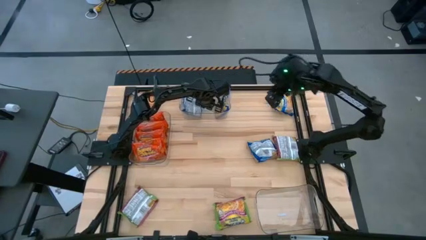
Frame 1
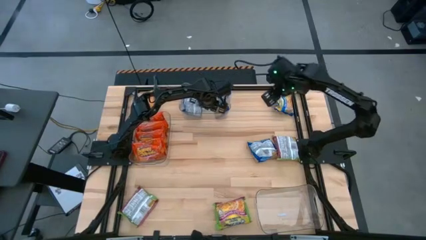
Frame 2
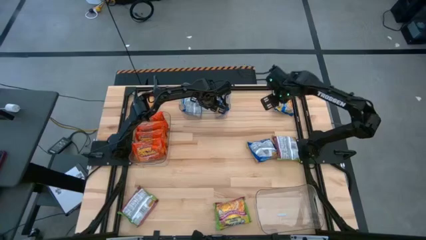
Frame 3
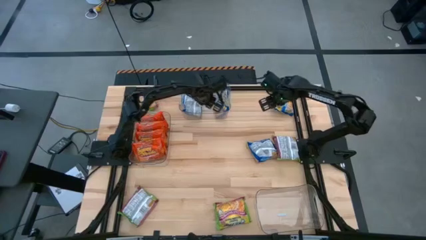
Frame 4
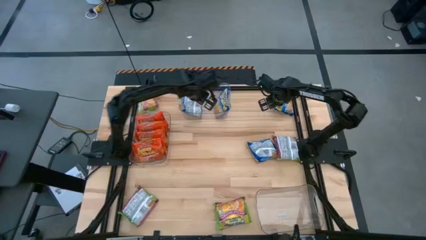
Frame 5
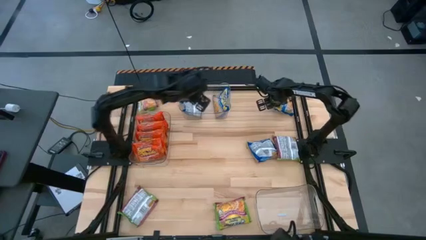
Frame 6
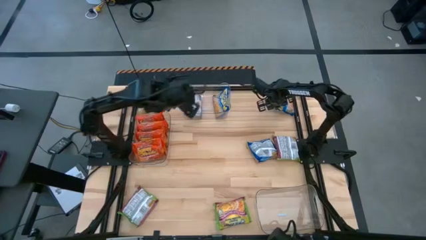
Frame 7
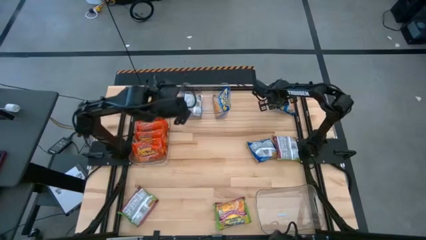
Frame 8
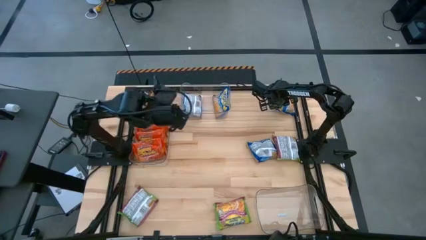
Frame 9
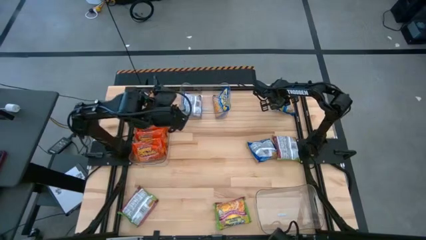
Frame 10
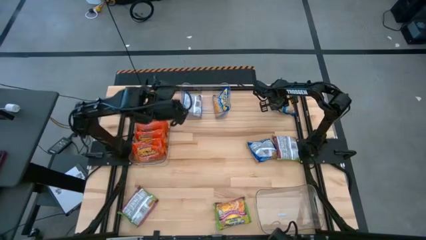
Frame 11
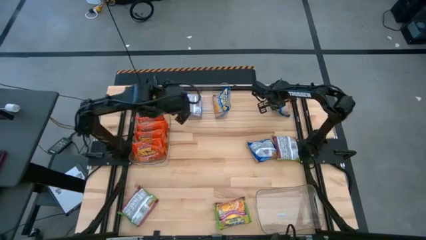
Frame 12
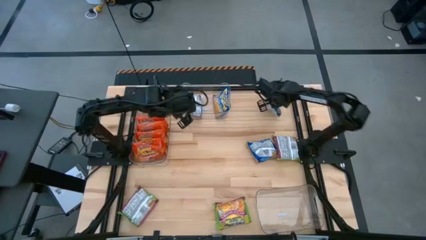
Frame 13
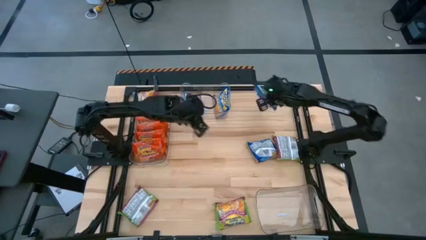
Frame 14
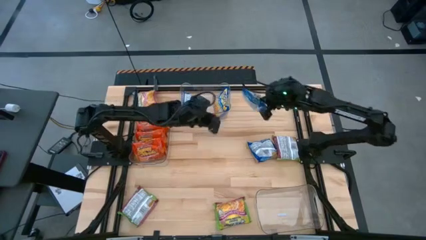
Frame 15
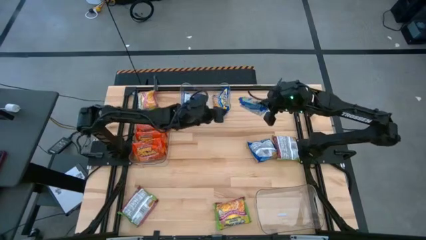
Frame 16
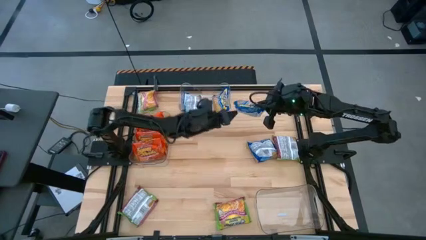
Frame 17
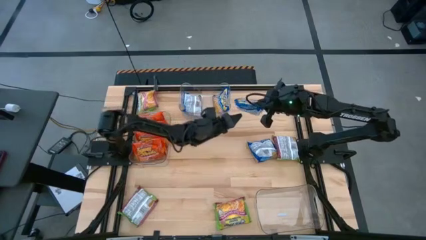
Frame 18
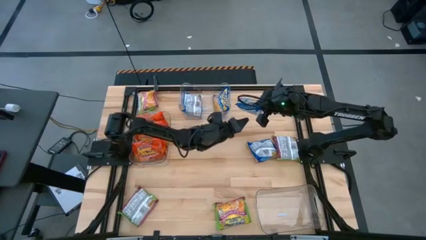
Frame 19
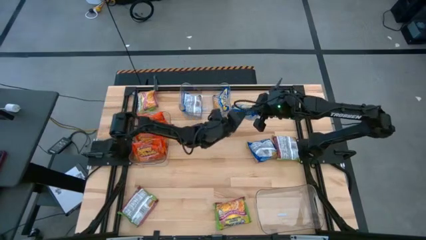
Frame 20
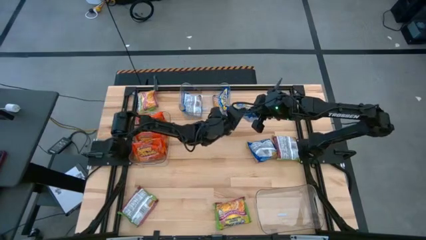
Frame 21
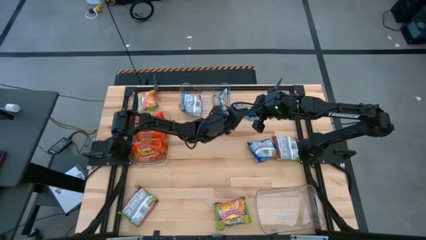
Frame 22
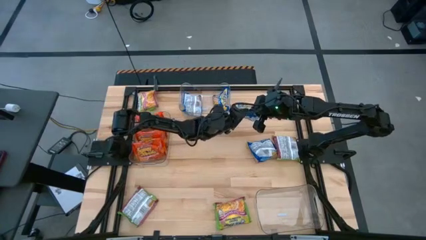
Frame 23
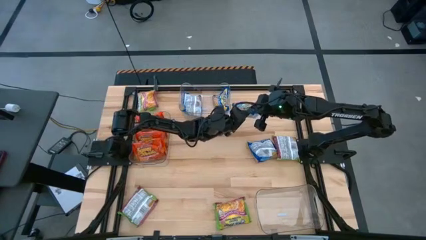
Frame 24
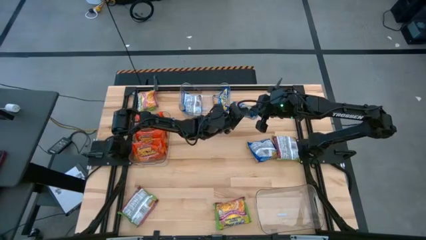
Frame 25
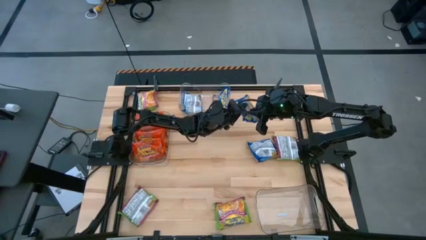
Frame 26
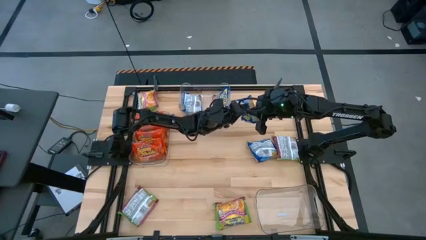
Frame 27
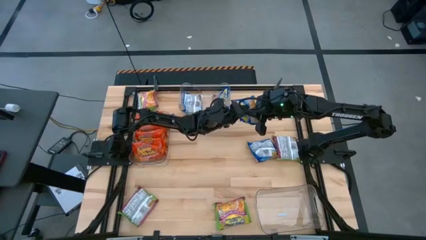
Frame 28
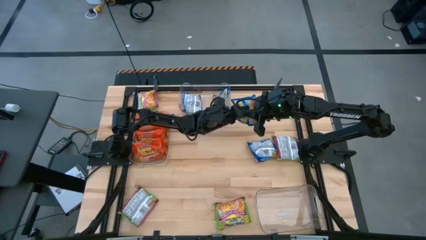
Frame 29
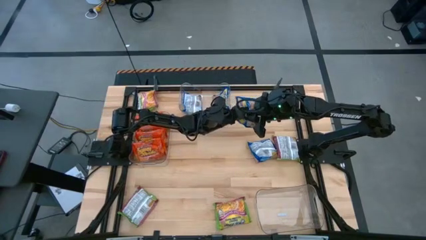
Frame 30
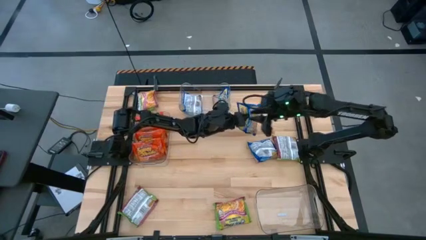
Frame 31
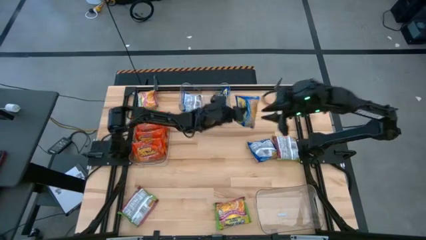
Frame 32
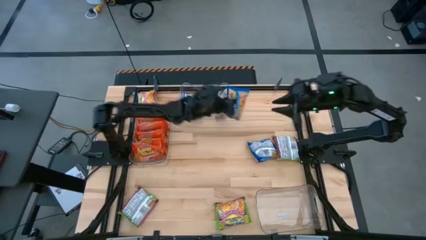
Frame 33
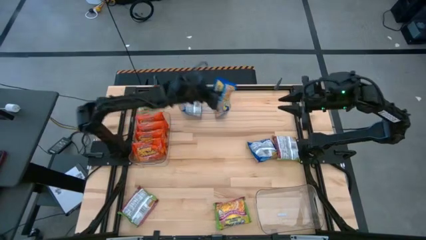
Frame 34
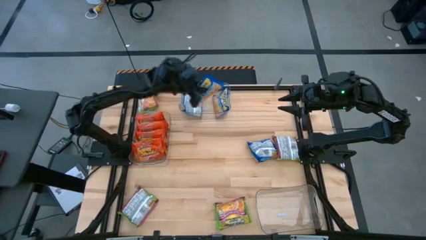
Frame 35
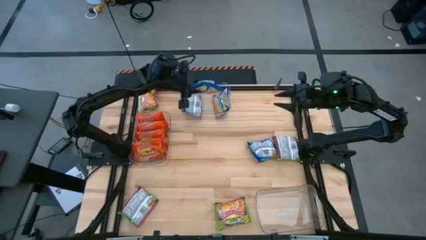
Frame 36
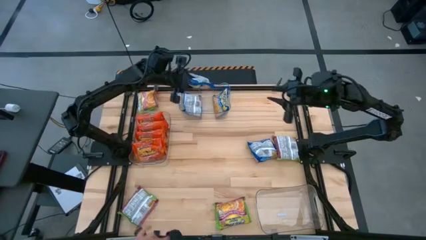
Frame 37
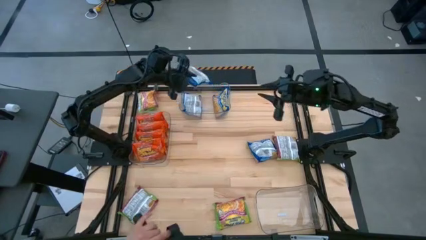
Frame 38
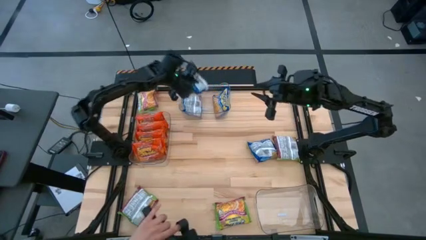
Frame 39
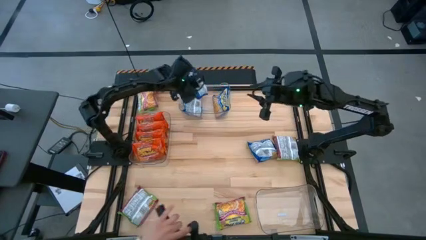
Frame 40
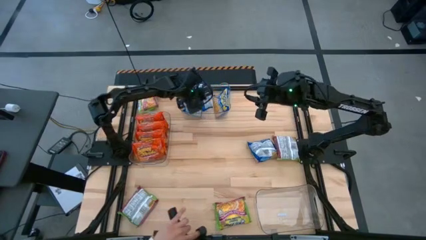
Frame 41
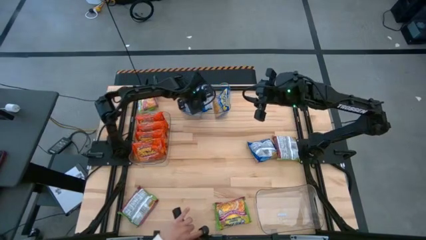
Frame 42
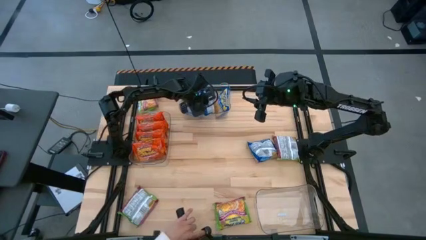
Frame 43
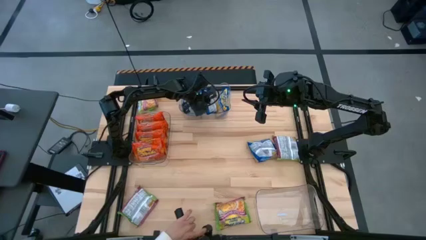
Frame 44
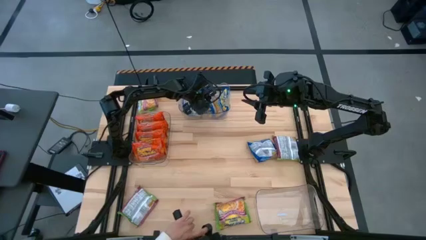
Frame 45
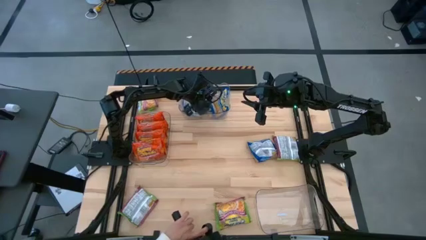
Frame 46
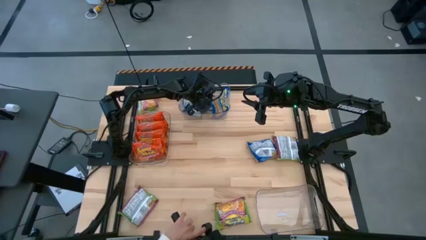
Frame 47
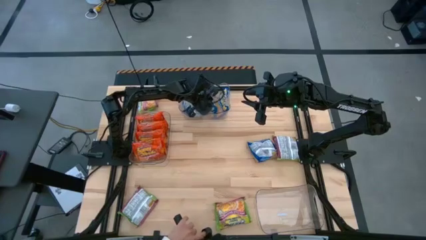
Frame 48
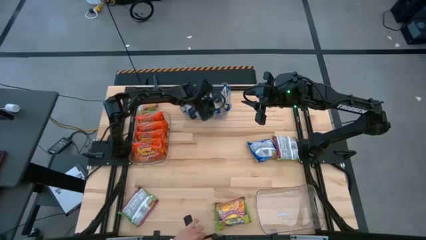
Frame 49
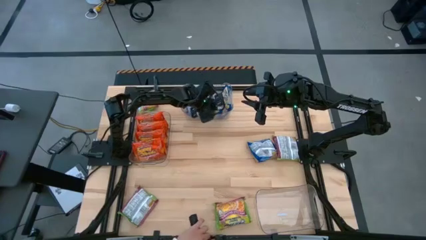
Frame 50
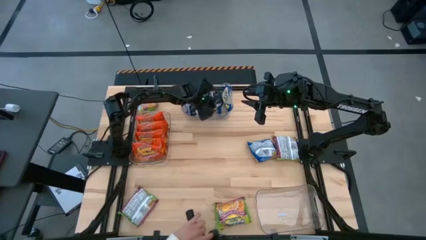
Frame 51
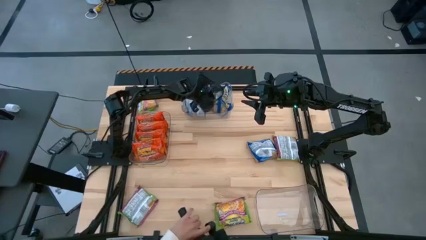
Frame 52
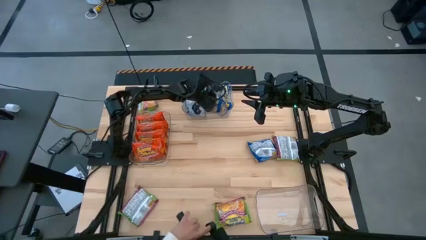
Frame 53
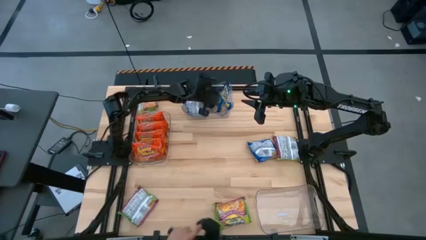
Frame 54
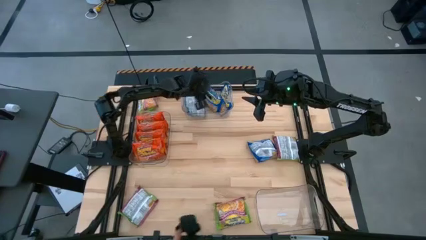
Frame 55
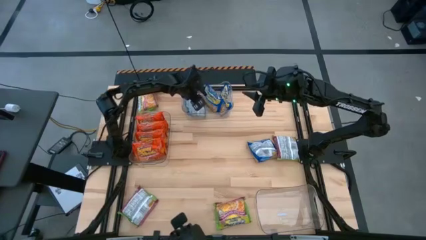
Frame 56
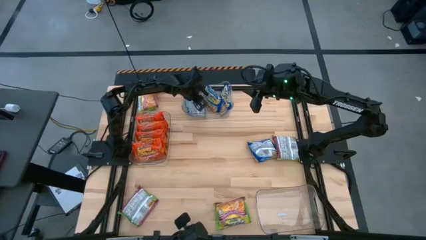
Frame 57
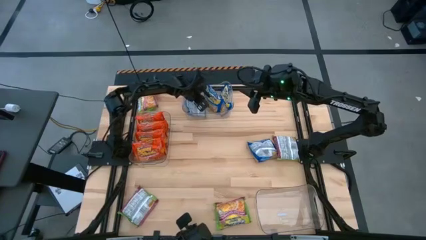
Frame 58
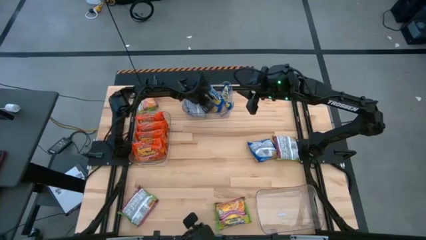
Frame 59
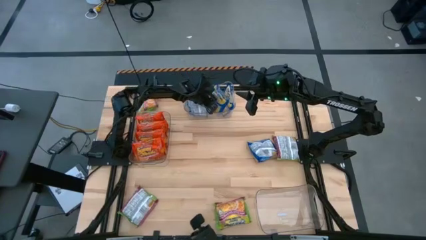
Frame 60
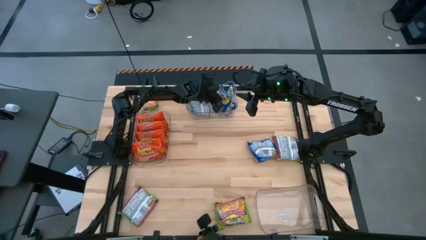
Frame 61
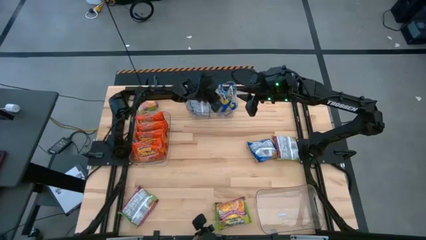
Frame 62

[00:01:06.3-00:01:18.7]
Task: Sort Maruchan noodles
Put the blue noodles into the middle transparent bin

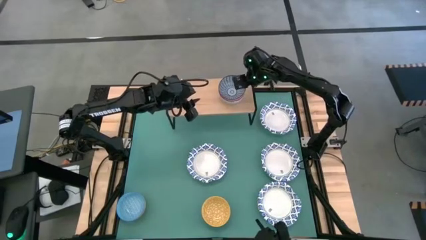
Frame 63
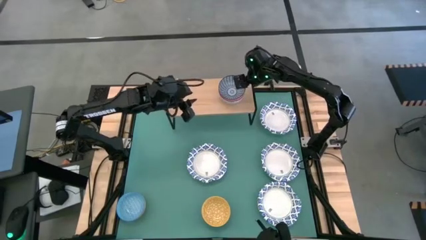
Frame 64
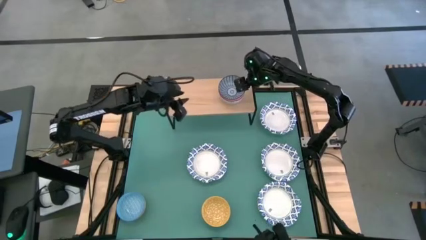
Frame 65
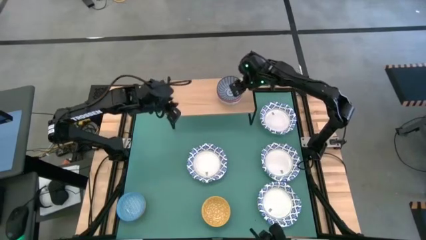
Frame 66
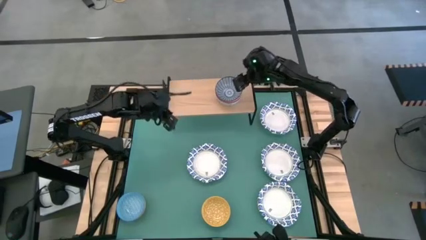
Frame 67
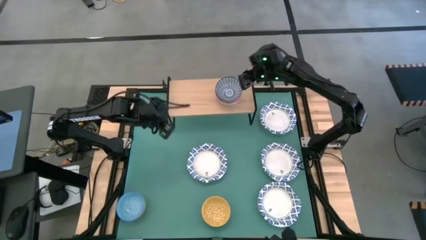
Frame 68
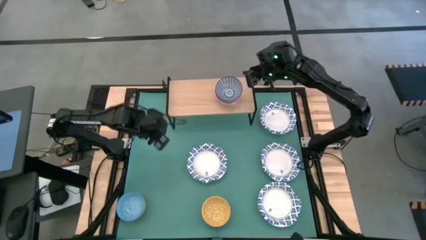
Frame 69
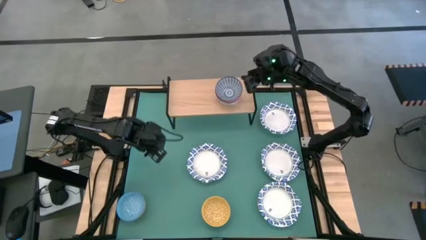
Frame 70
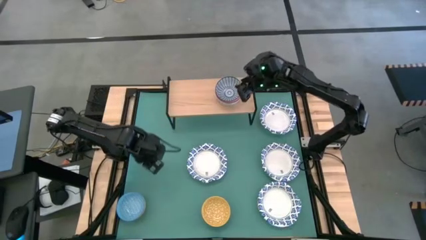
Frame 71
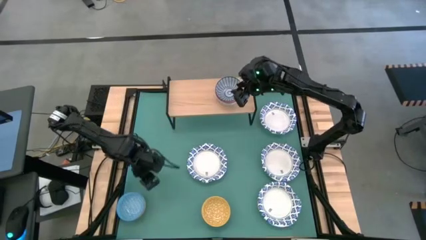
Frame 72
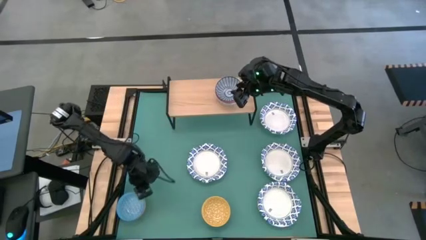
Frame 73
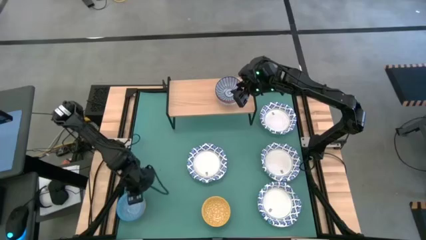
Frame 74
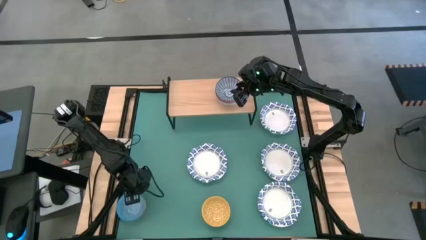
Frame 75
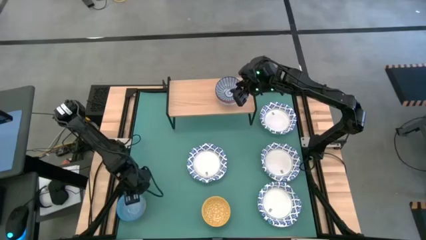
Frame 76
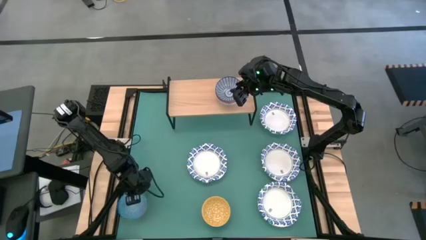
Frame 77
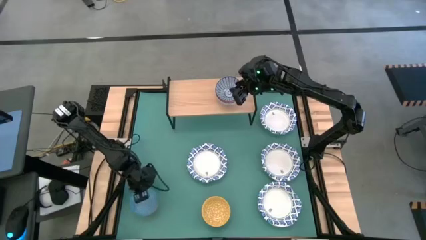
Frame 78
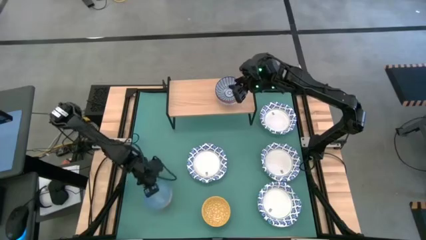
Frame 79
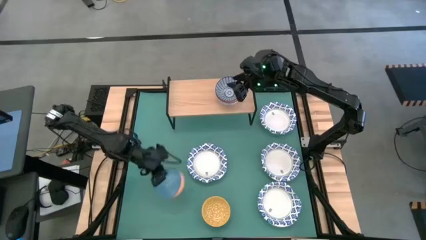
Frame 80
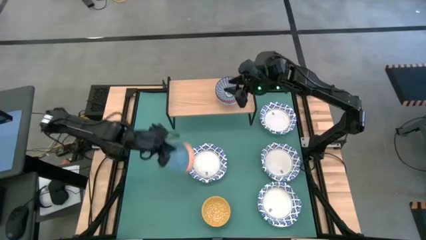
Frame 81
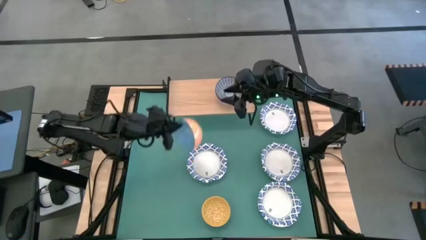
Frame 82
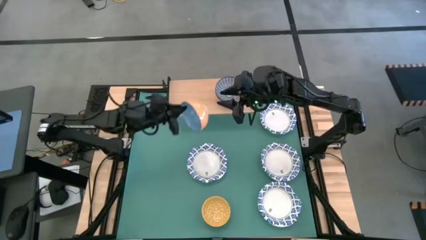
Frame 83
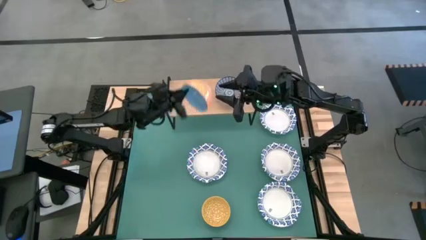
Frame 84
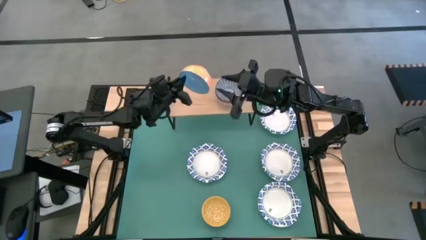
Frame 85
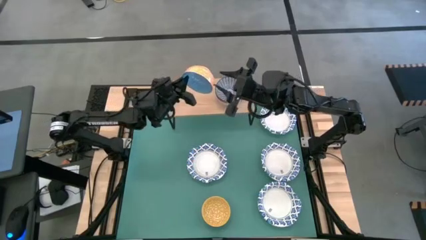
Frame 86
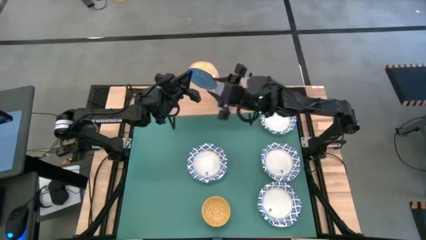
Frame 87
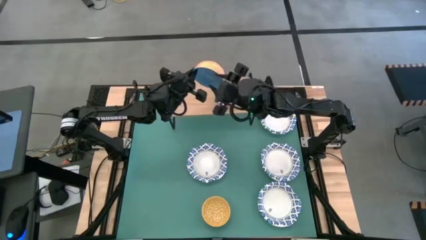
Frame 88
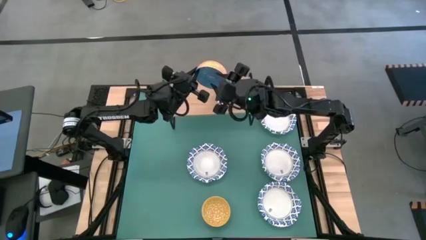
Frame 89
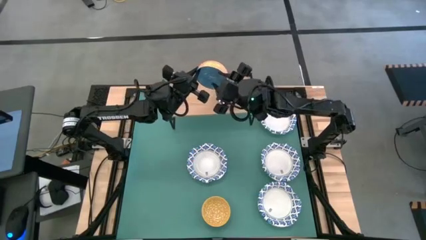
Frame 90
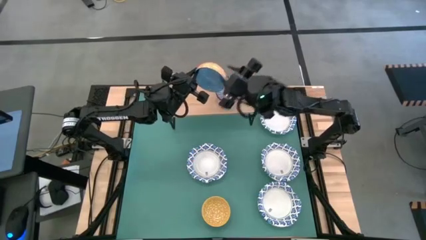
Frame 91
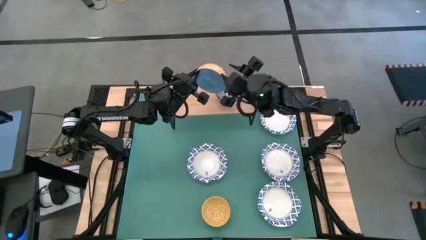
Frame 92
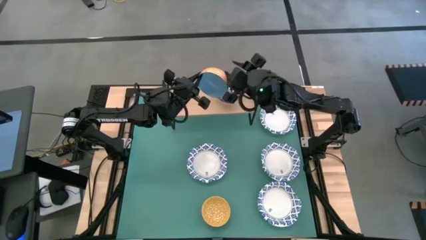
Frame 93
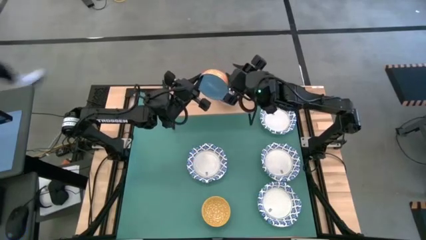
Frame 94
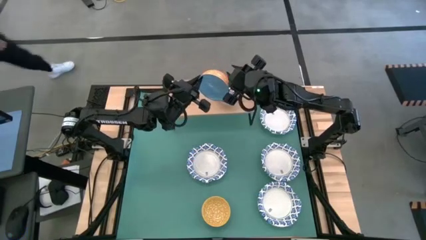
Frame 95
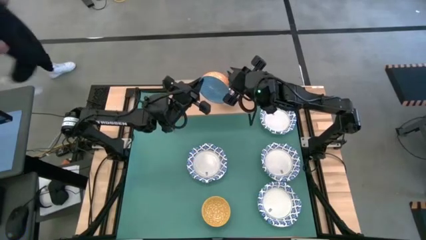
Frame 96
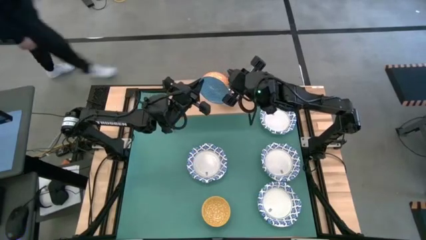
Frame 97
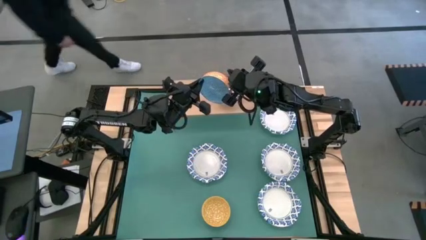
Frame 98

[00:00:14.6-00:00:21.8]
Task: Place and stack bowls onto a shelf
Stack the light blue bowl on top of the blue bowl on the shelf
